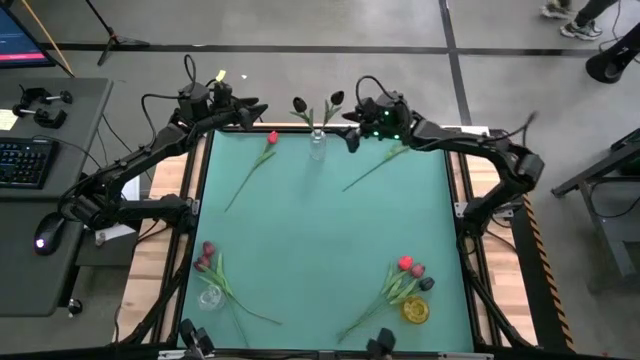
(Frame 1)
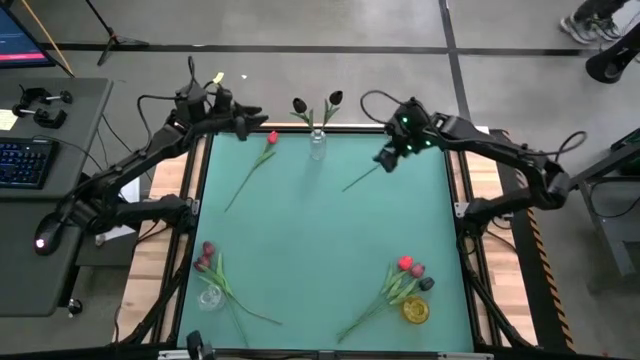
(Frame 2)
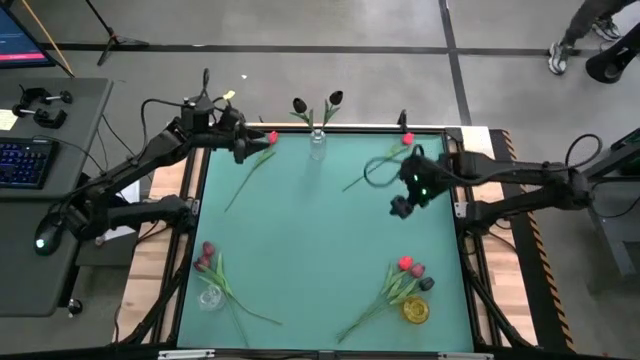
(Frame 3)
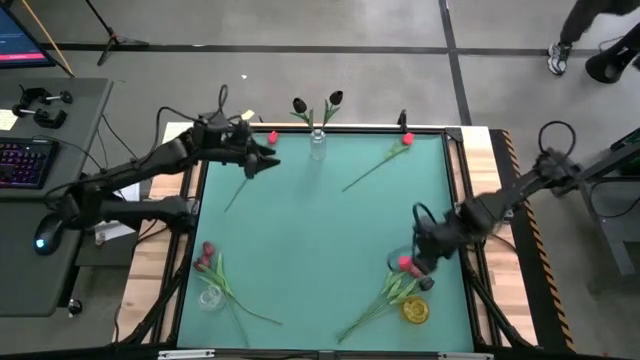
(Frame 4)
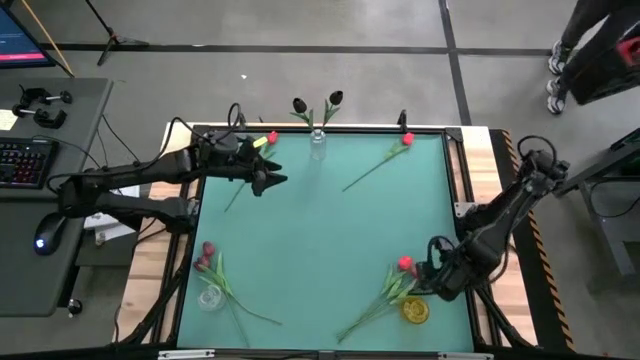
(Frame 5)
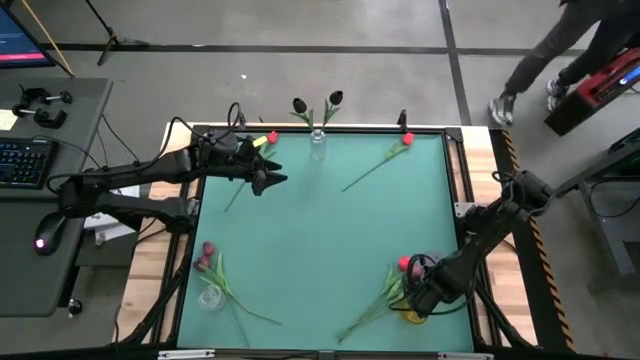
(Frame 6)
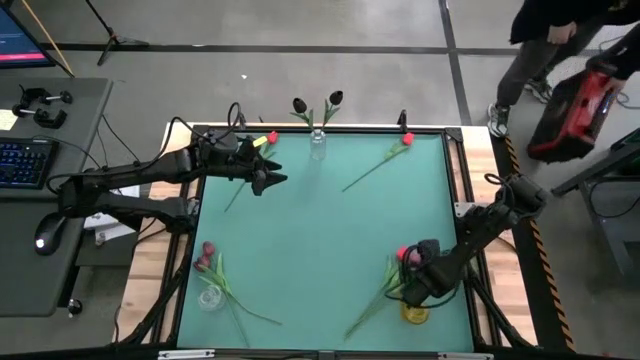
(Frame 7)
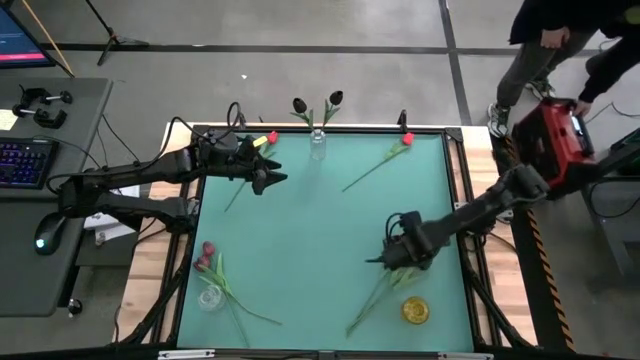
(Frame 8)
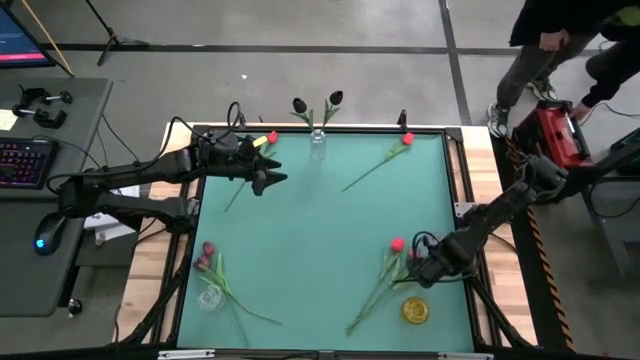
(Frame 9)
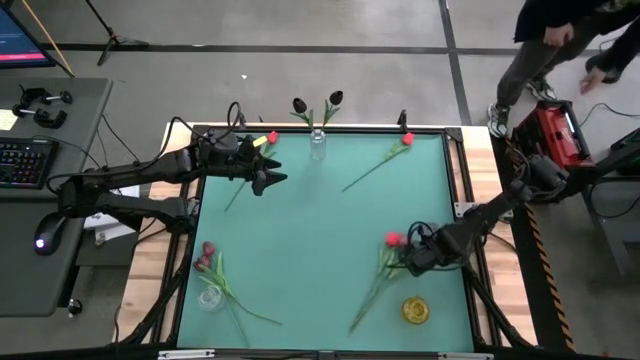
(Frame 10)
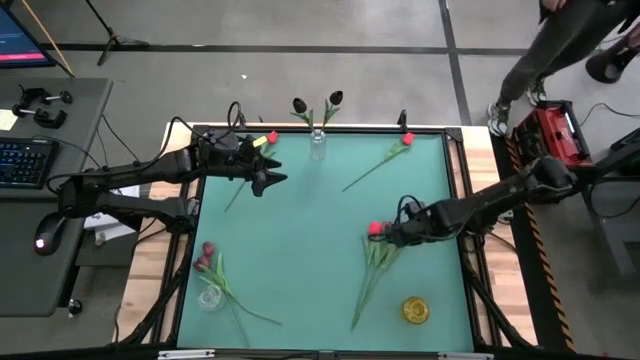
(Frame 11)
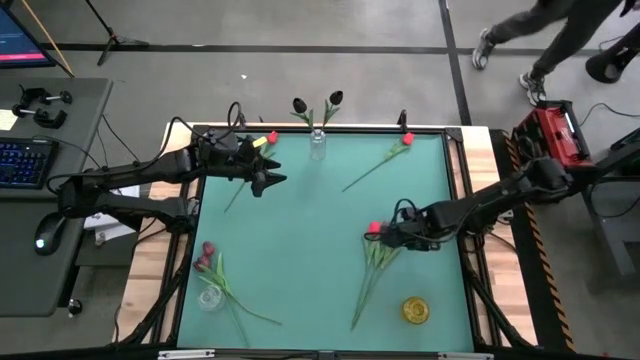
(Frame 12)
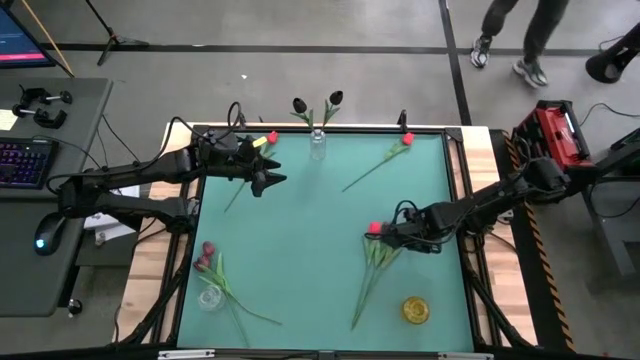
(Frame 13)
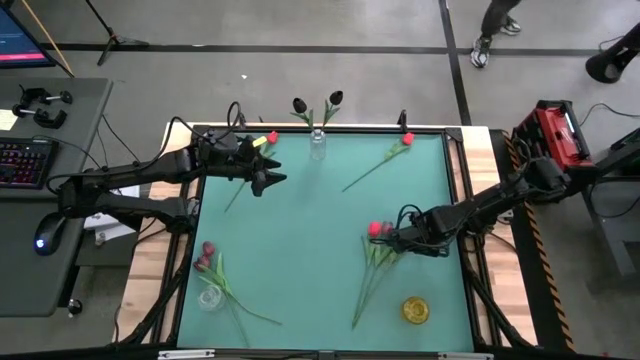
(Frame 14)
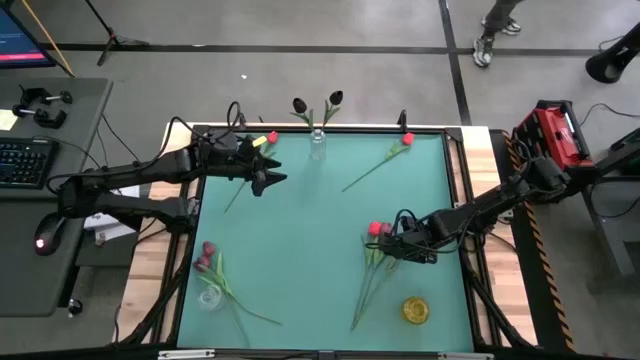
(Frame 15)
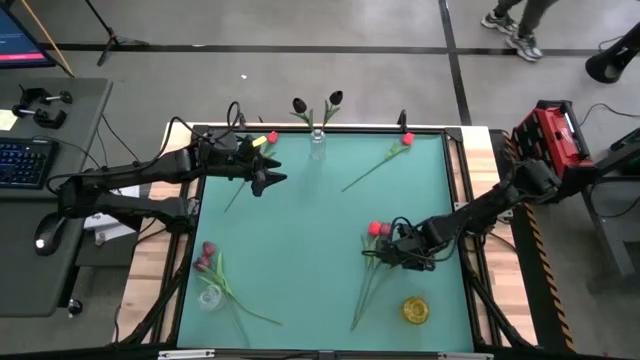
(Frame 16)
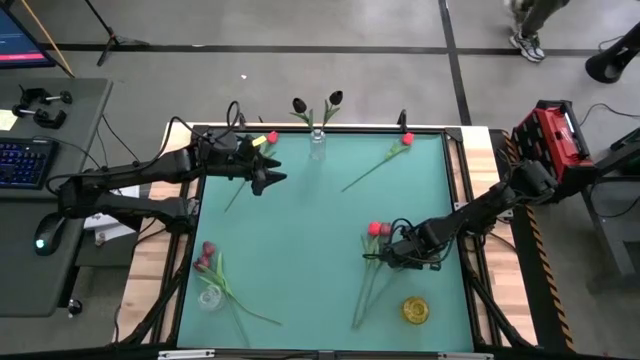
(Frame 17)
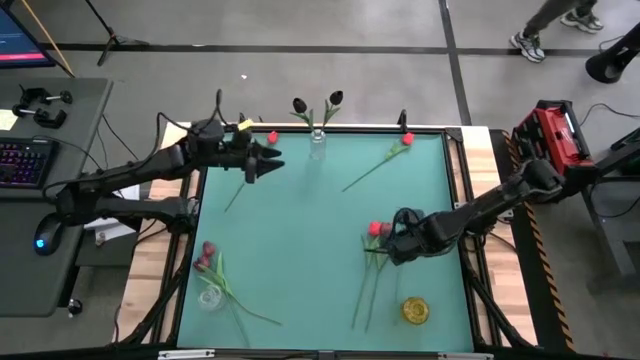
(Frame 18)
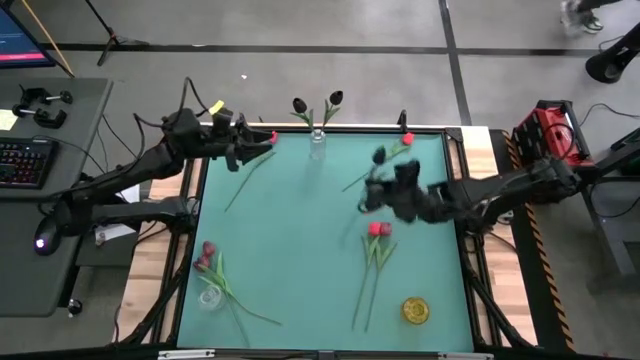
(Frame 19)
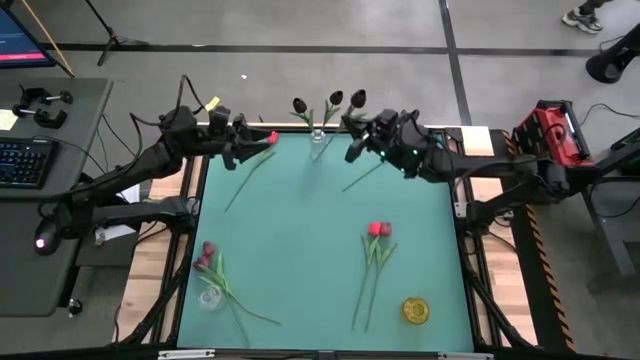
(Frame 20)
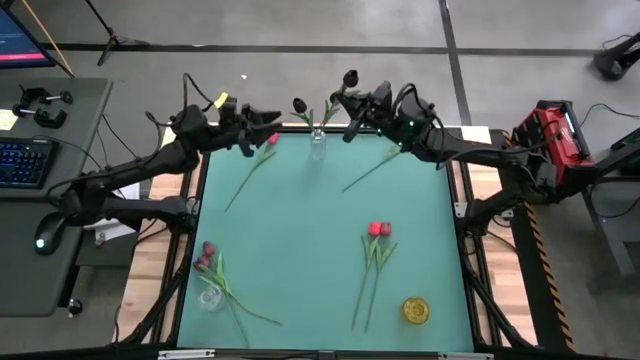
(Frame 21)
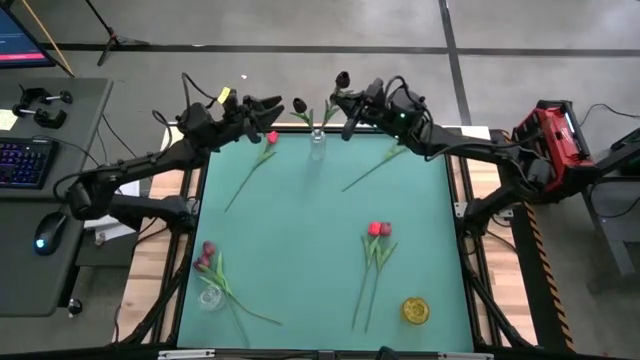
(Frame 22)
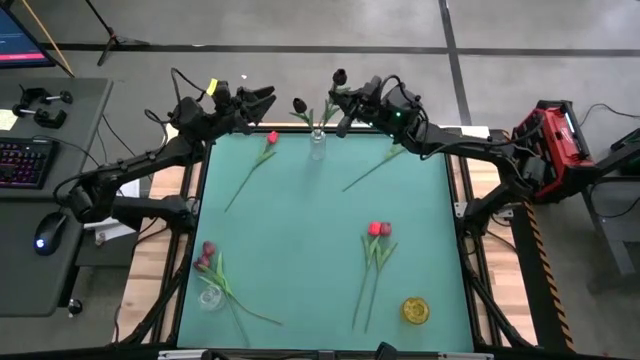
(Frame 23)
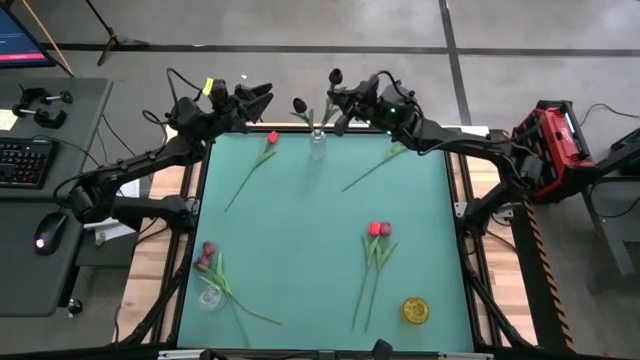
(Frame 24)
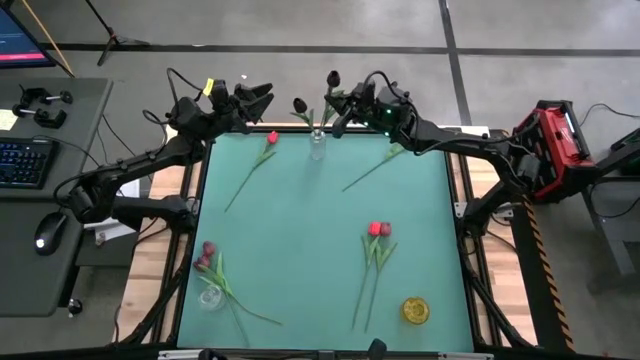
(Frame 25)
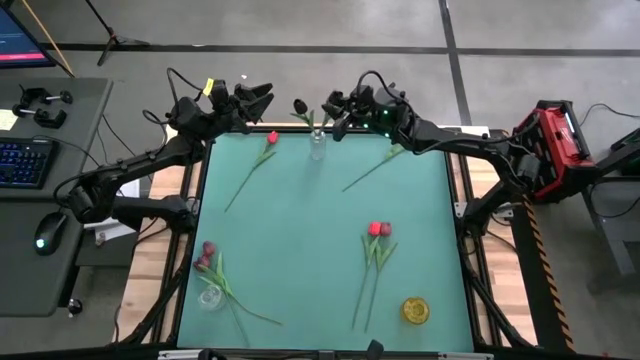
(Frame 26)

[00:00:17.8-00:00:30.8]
Task: Sort flowers into vase by color
Put the black tulip into the top transparent vase

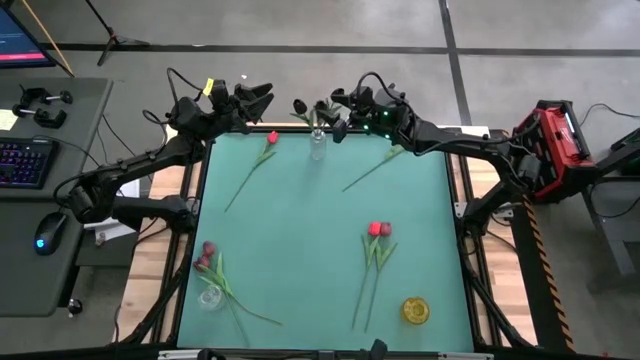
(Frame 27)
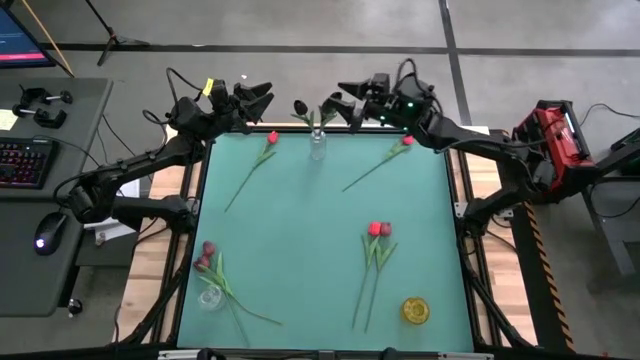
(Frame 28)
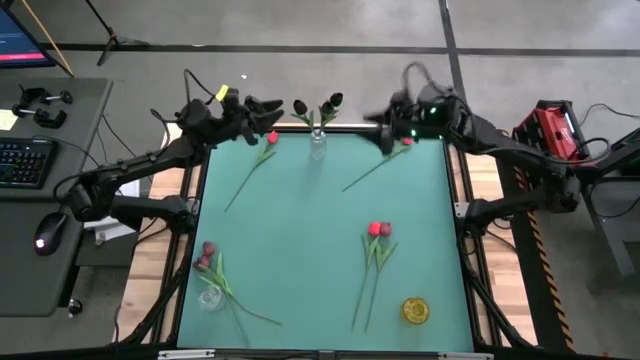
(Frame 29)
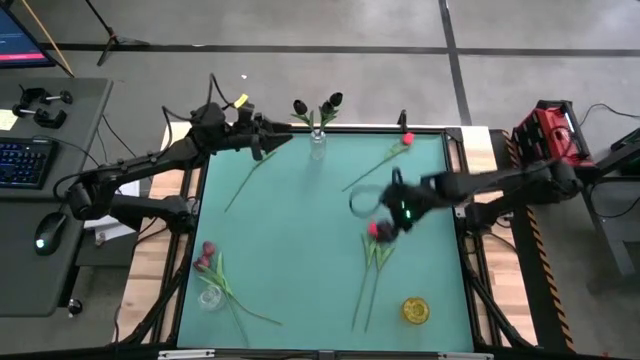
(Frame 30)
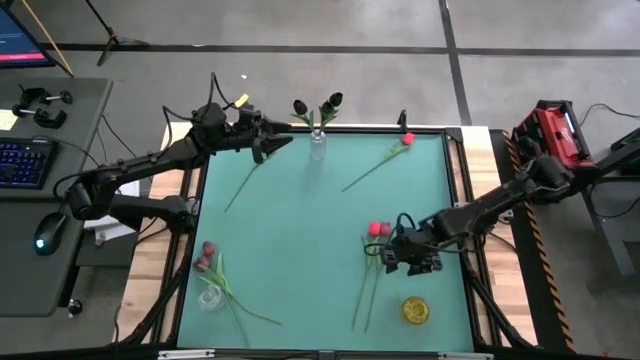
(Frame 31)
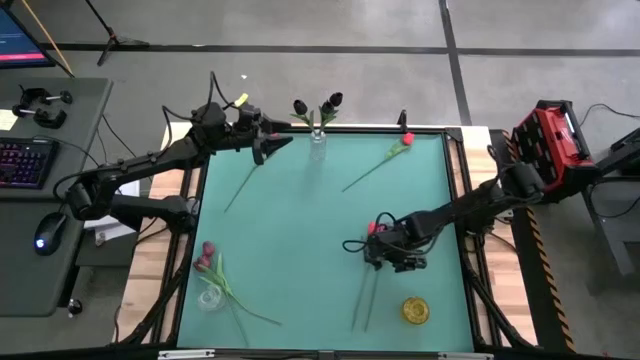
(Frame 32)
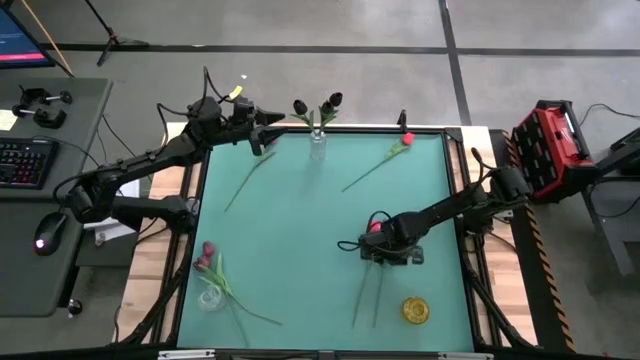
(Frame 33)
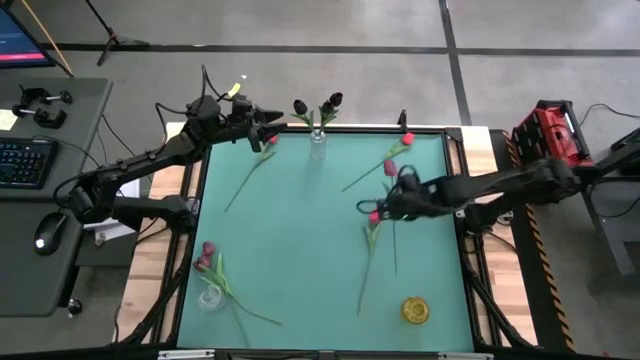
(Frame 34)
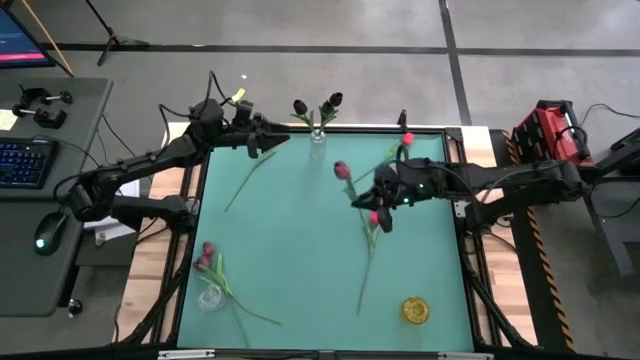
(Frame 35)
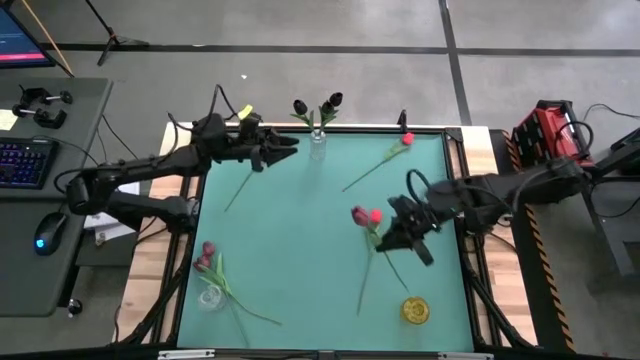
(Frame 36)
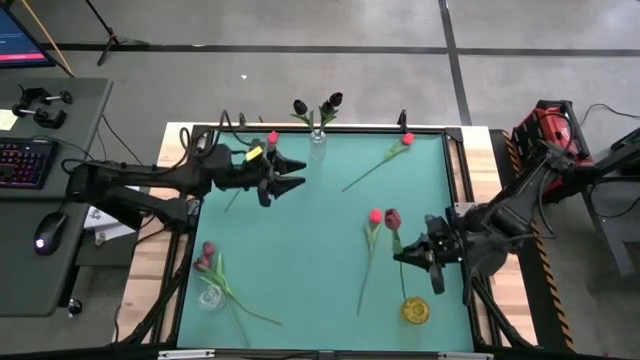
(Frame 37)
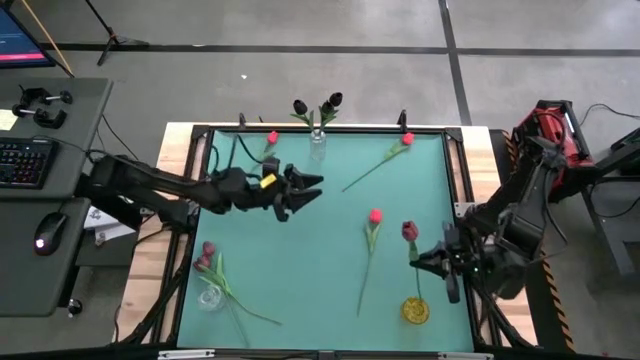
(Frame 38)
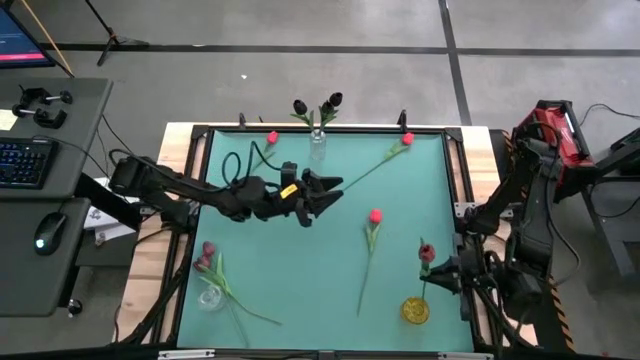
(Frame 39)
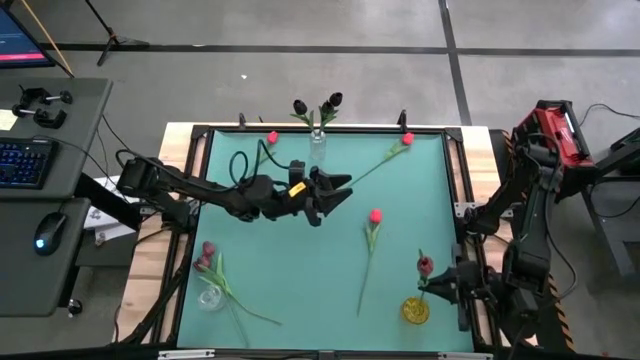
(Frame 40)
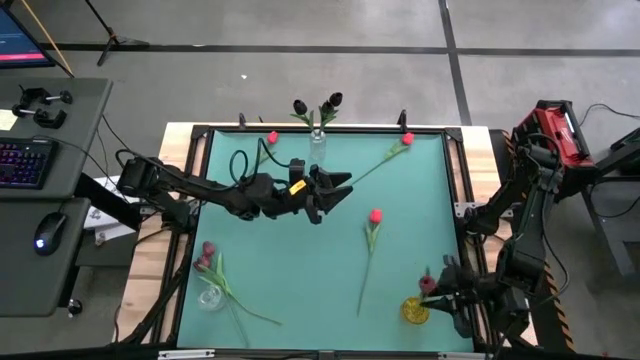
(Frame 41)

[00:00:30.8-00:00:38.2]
Put the right dark red tulip into the yellow vase
